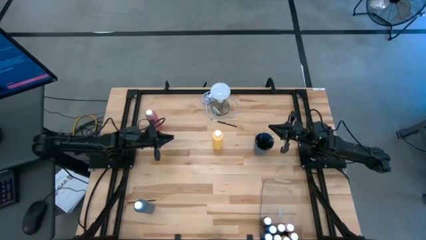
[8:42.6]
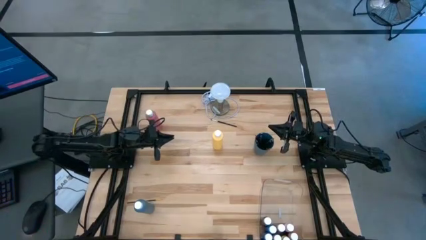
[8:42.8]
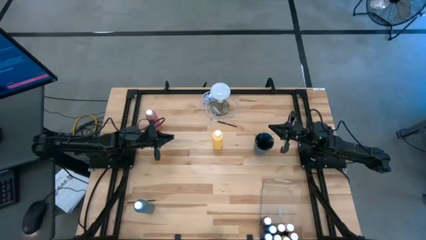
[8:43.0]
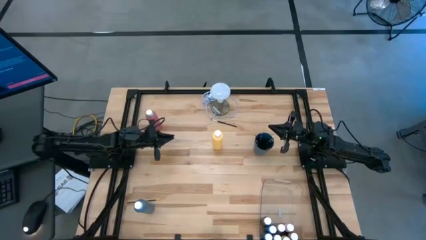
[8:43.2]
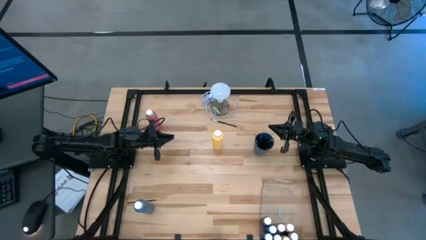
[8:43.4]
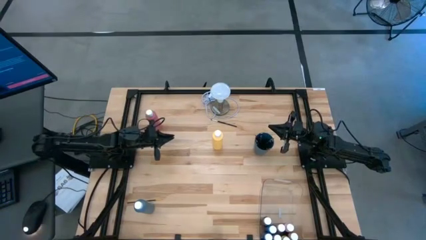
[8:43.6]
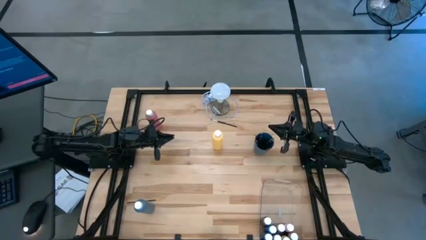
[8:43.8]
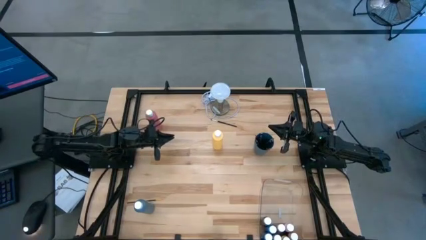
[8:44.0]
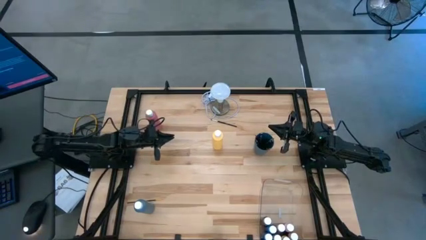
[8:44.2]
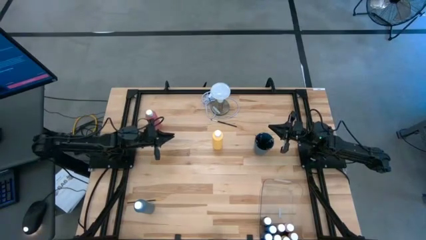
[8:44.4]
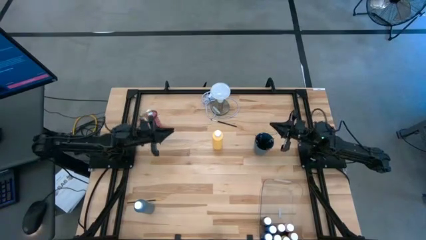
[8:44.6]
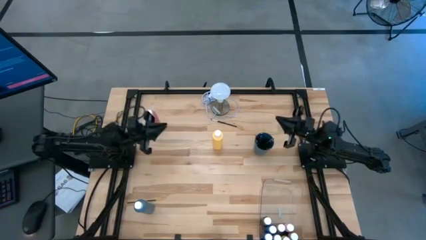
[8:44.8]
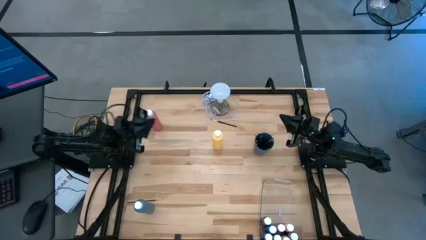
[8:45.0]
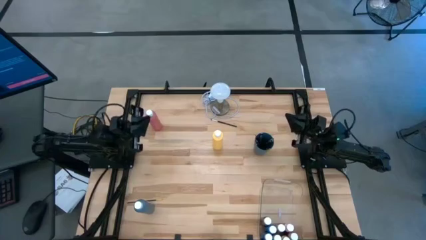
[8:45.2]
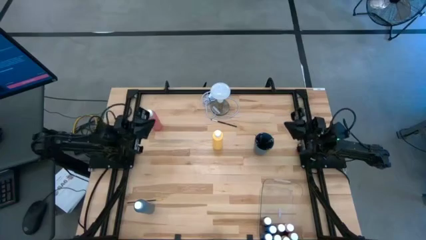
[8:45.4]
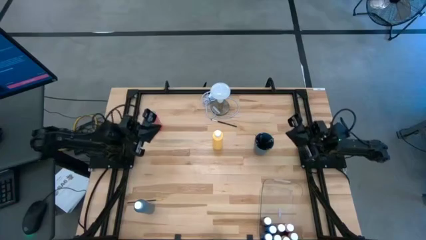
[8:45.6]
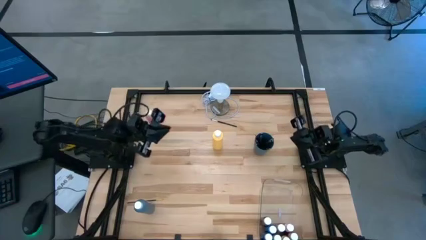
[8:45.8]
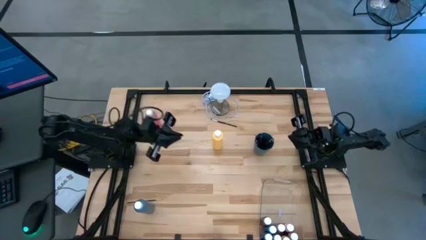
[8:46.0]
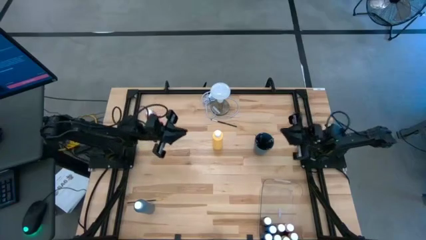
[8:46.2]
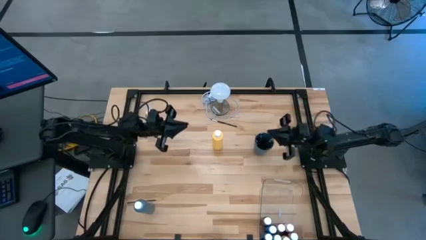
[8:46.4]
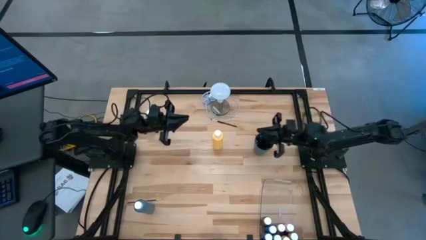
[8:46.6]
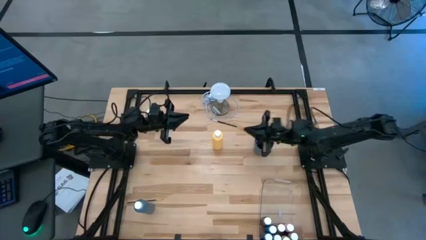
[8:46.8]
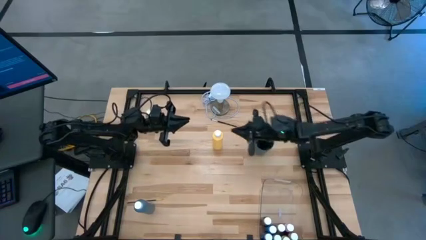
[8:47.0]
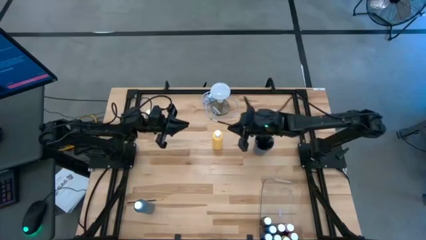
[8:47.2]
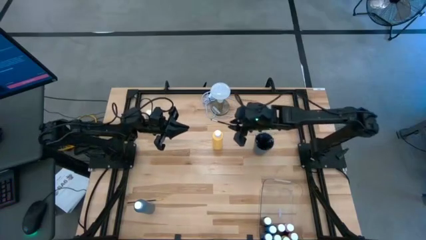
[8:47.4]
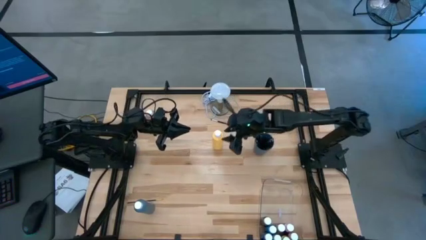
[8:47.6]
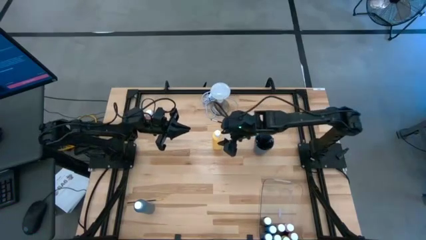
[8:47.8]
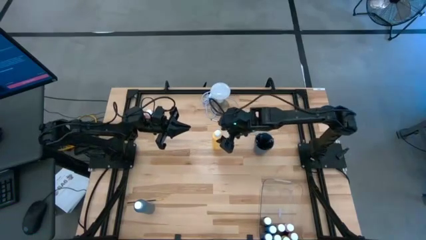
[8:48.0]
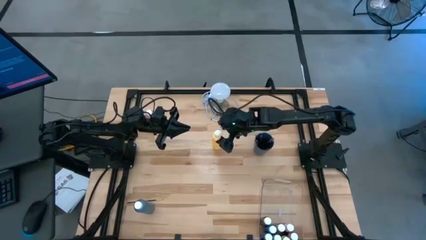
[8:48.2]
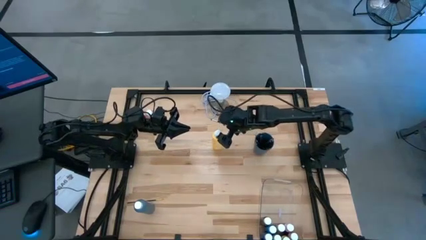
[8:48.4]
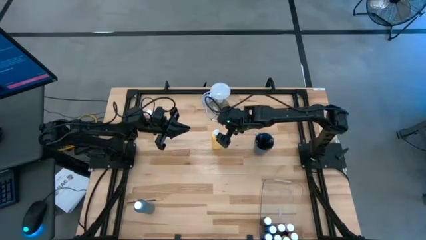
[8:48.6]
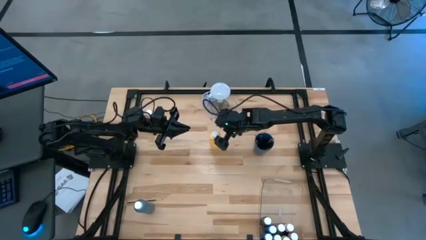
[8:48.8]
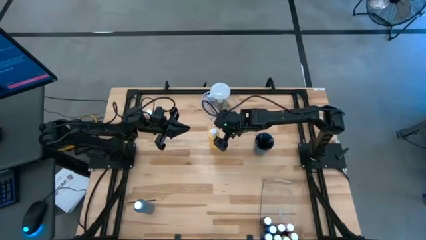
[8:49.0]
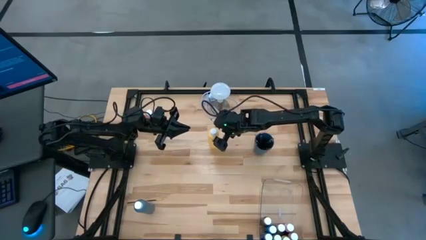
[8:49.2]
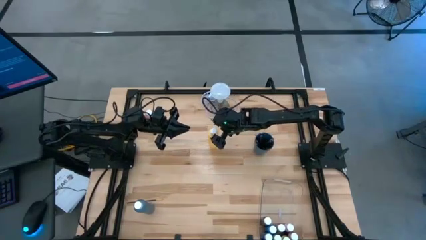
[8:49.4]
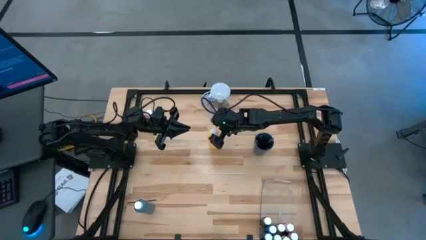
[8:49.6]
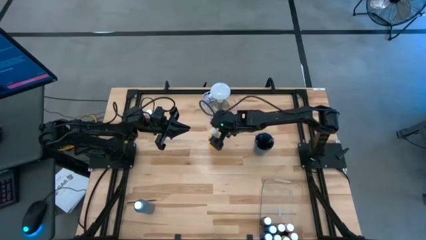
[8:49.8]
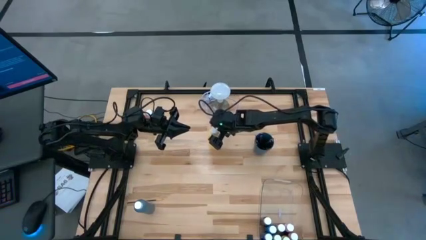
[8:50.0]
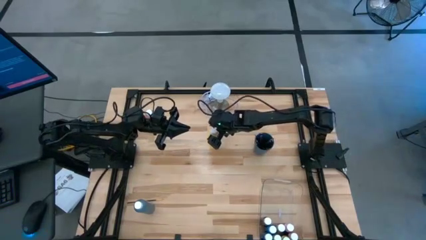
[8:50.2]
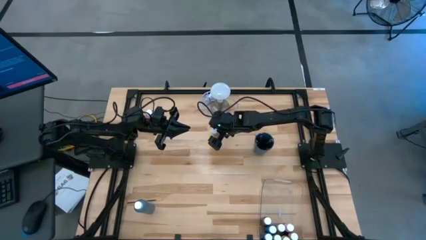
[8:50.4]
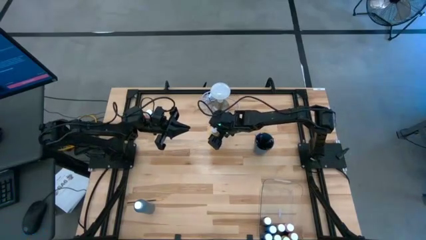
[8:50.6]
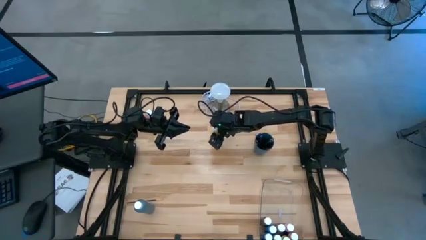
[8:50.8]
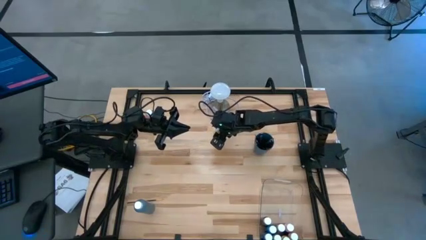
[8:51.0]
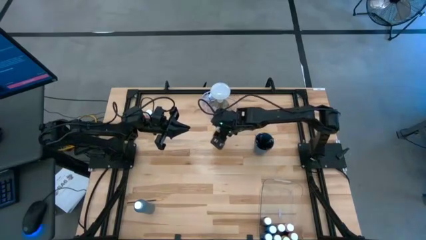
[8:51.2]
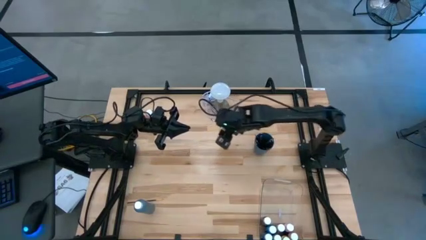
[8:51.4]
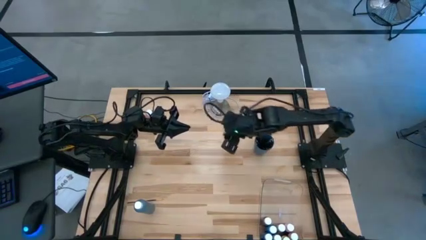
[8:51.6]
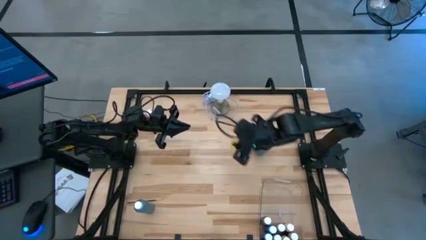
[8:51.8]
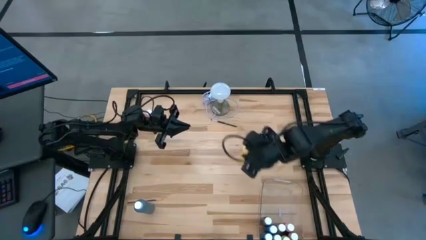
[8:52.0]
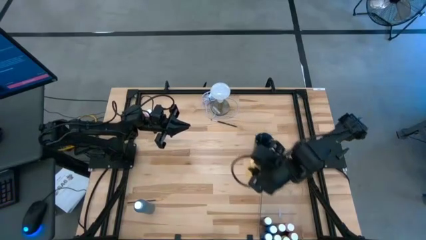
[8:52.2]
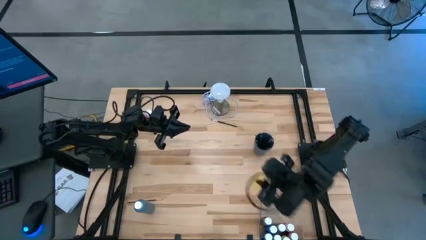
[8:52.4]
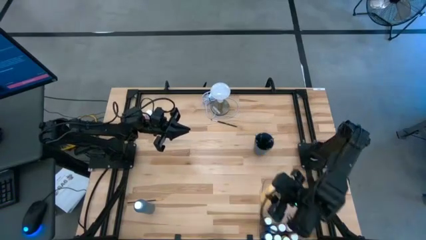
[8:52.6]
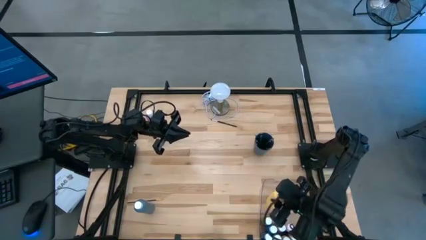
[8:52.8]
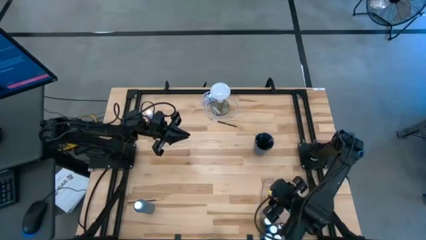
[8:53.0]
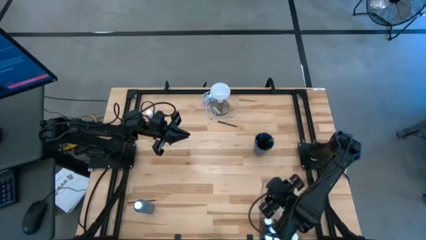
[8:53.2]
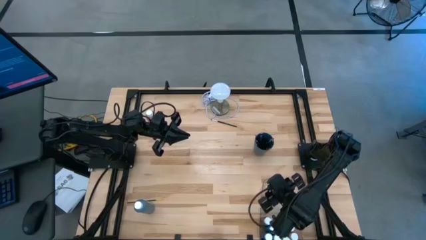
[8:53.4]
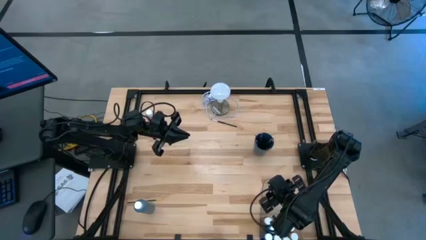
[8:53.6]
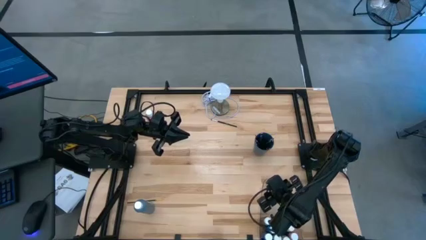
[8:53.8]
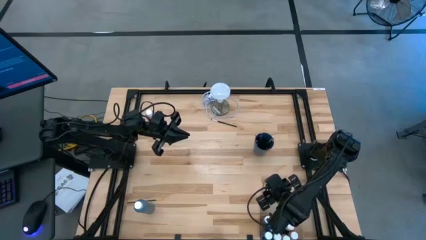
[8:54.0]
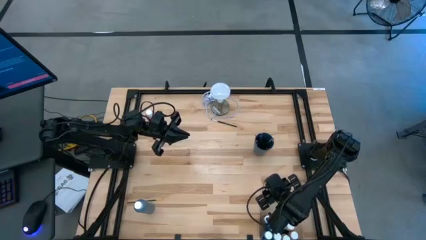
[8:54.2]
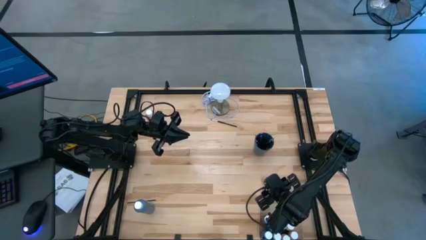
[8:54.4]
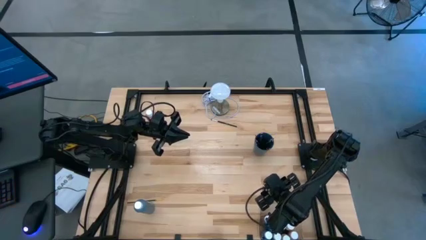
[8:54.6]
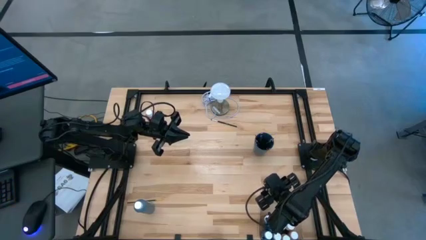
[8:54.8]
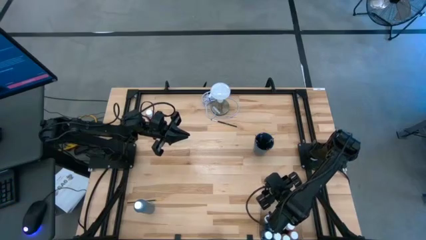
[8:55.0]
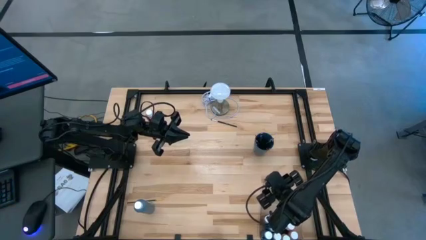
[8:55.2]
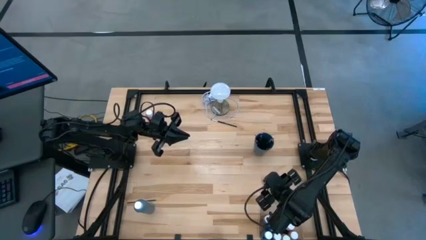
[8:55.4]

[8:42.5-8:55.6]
Task: Pick & Place Paint Supplies
Put the large yellow paint bottle into the bin
